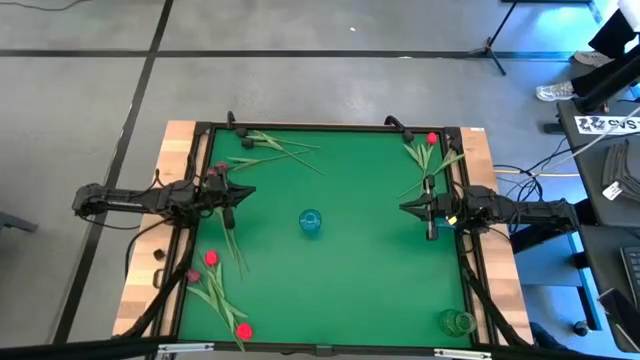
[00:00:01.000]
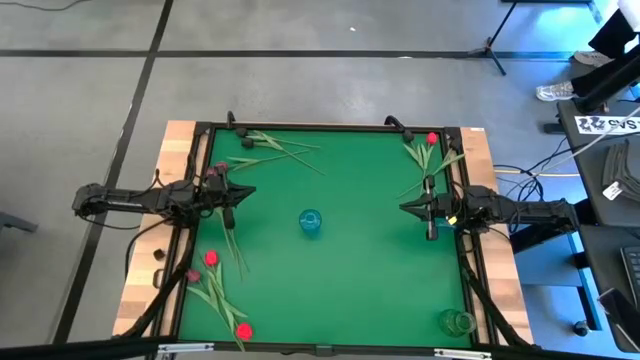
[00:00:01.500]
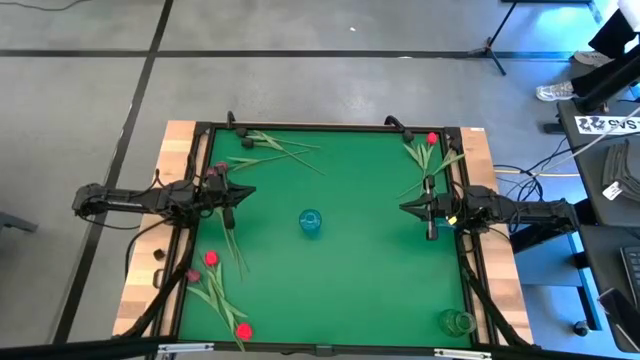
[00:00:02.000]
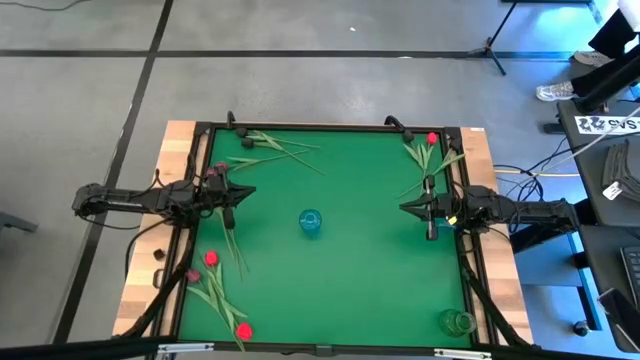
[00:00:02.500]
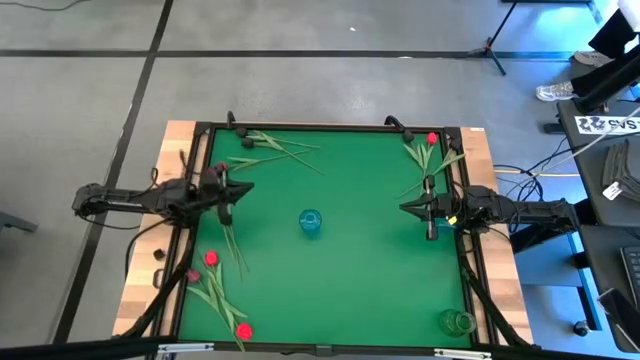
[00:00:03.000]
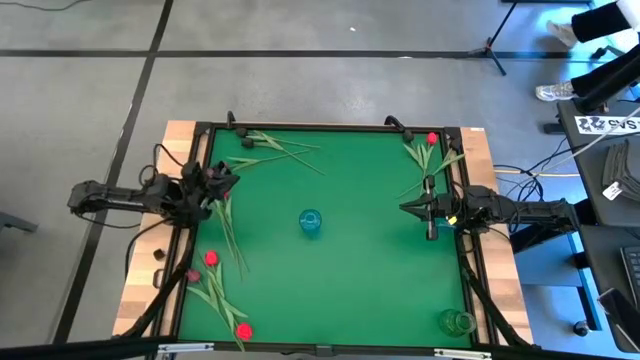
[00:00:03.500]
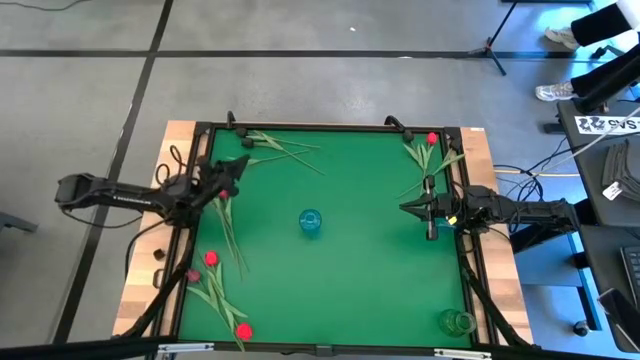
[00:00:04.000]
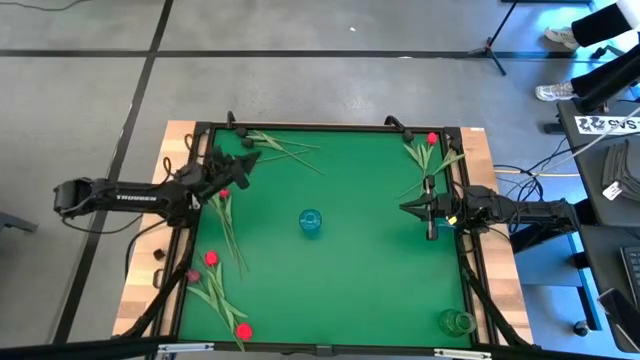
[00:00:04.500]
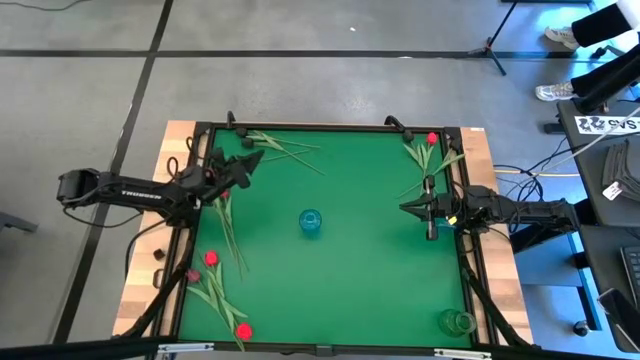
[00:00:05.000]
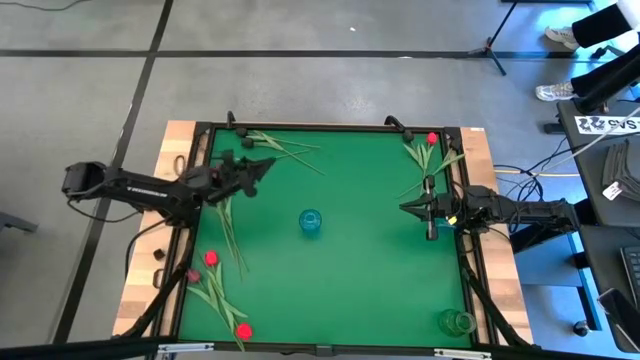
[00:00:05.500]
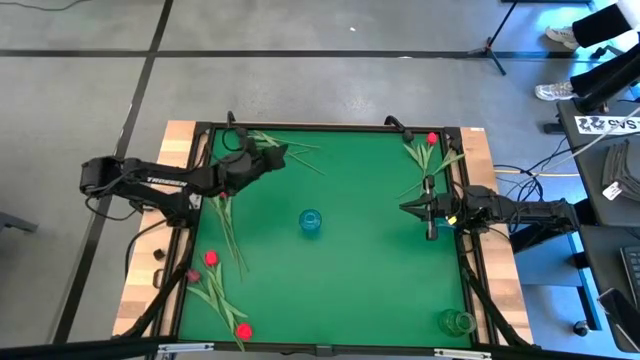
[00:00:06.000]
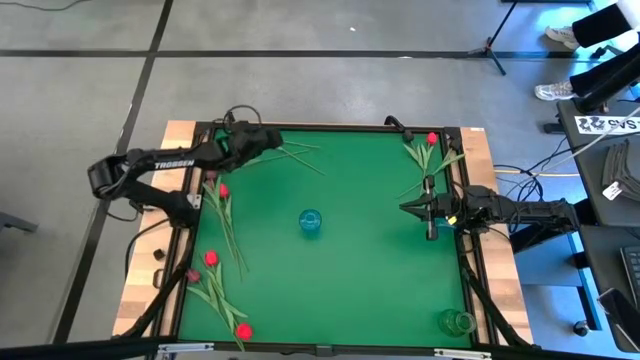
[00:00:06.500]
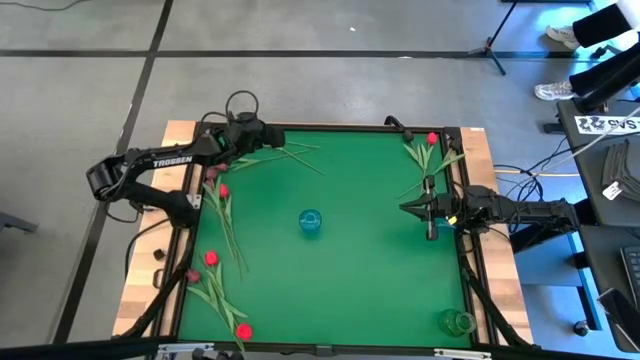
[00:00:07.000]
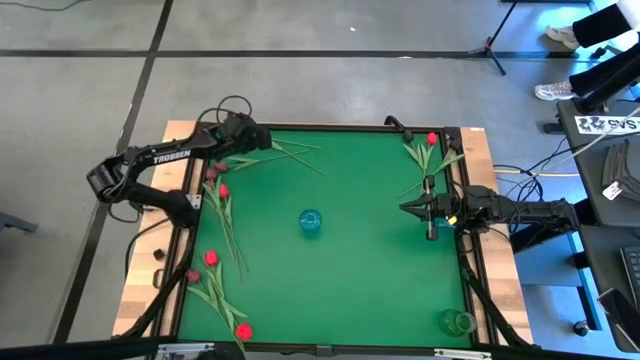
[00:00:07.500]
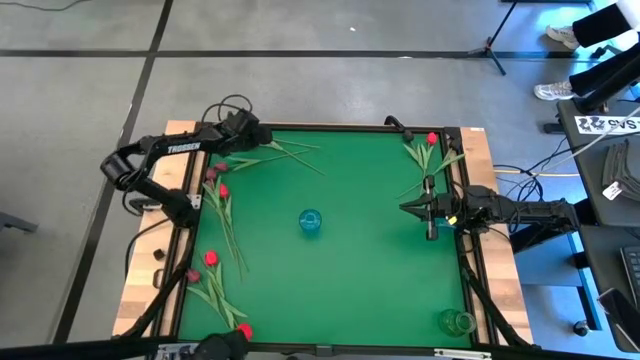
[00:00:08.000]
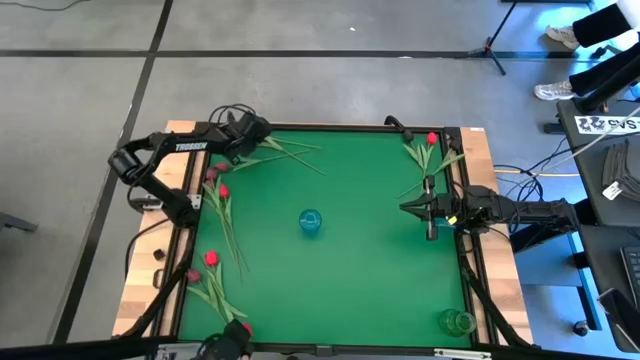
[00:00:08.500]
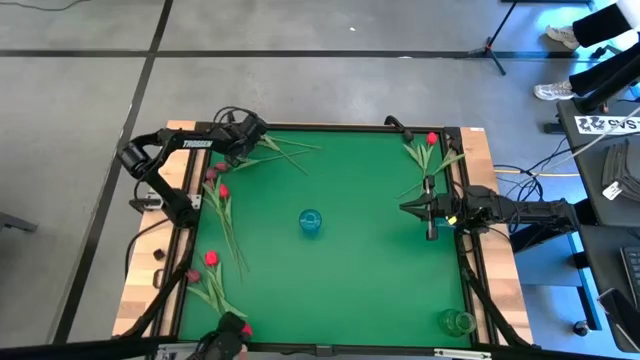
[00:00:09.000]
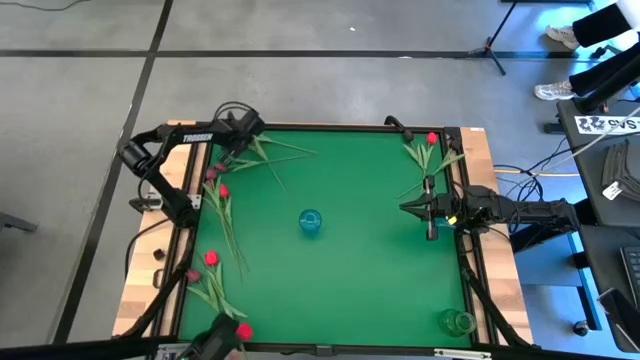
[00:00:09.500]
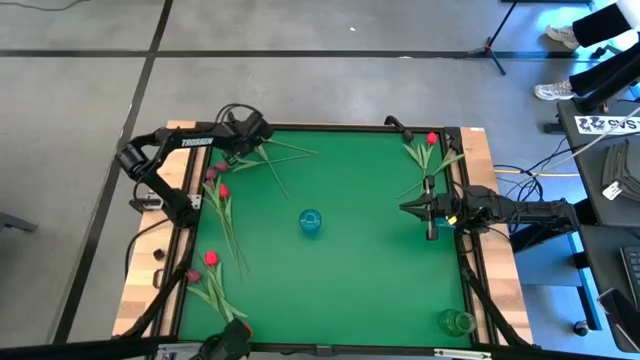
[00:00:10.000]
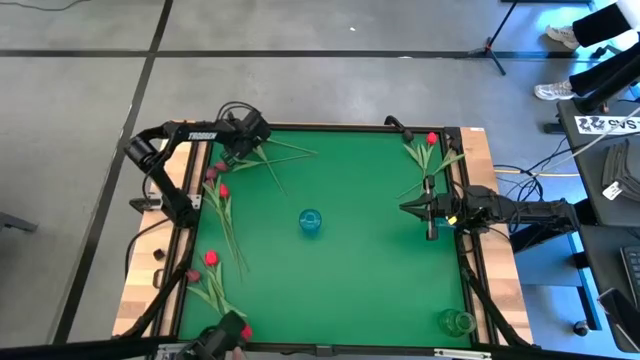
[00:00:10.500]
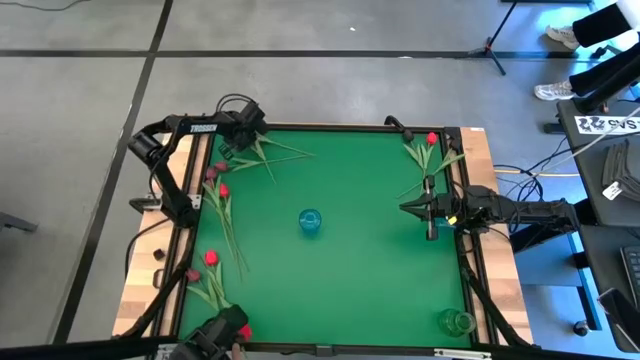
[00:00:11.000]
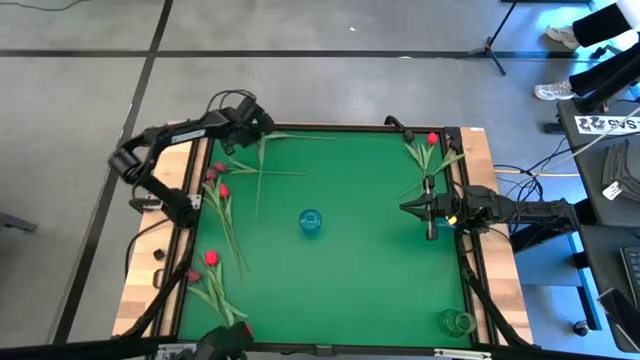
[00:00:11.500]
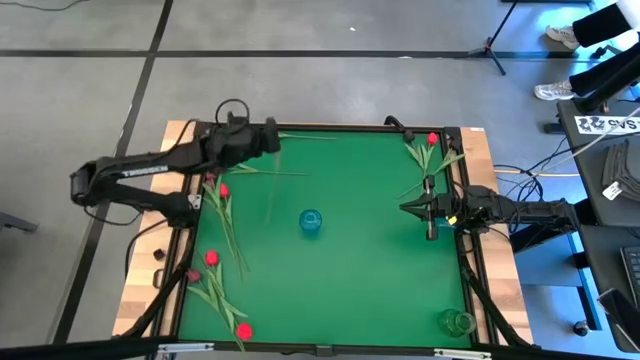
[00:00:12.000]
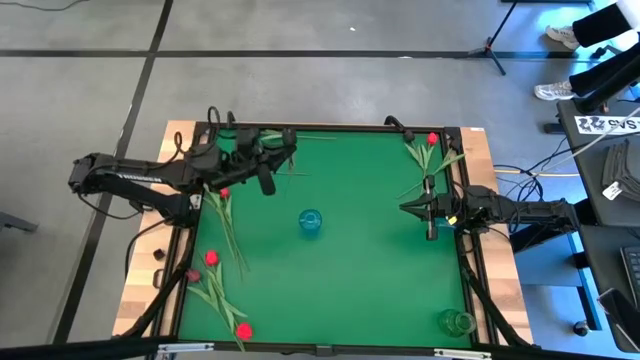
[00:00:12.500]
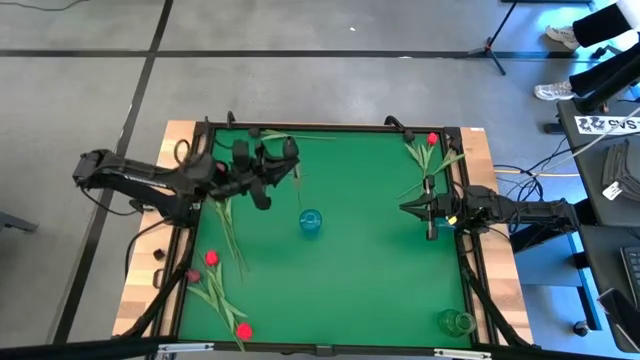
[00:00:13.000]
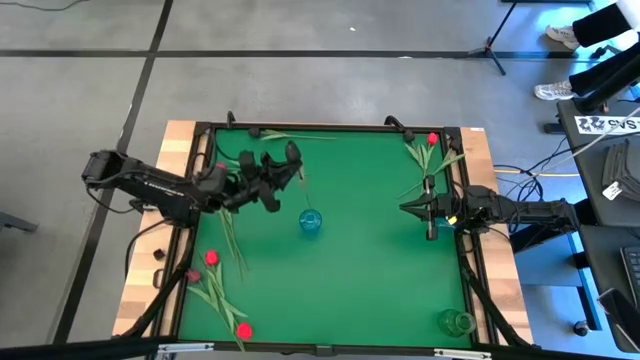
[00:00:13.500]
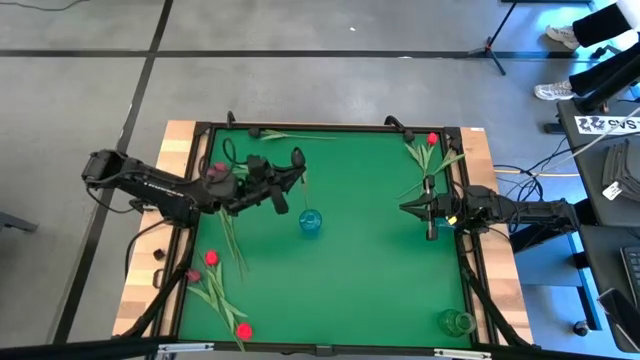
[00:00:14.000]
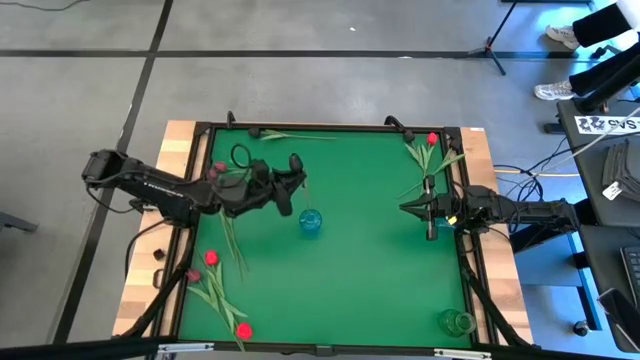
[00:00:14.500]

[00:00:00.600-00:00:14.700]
Task: Sort flowers into vase by color
Put the black flower into the left blue vase

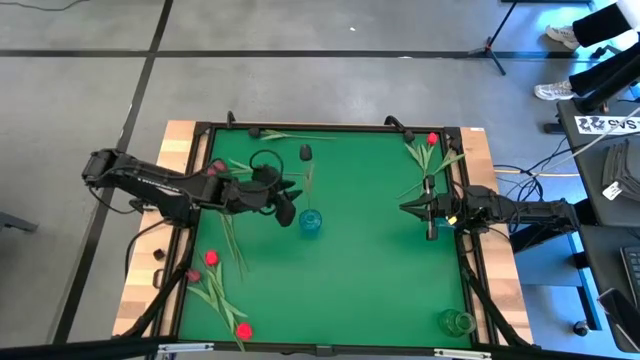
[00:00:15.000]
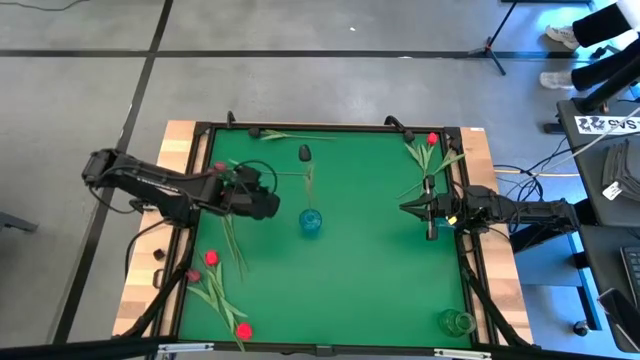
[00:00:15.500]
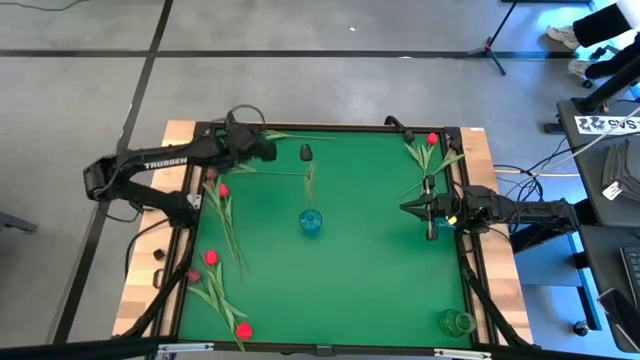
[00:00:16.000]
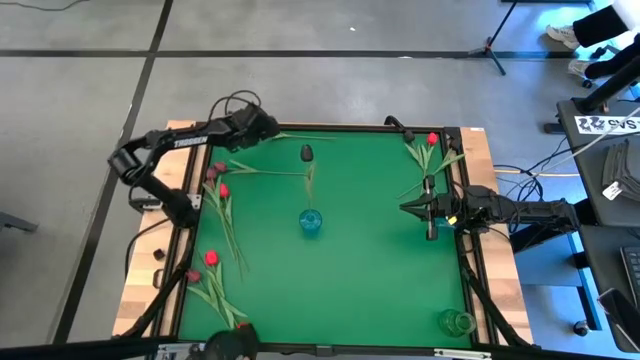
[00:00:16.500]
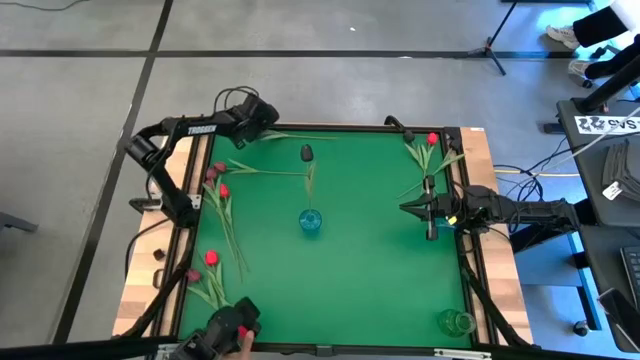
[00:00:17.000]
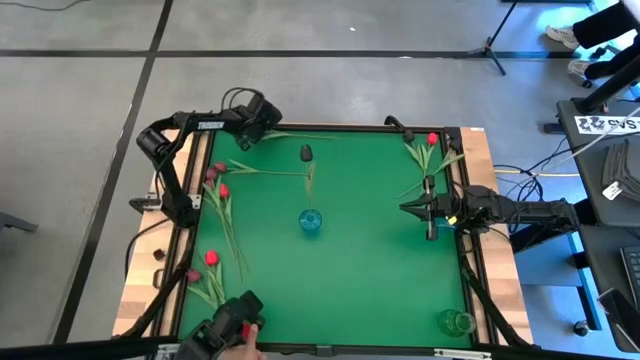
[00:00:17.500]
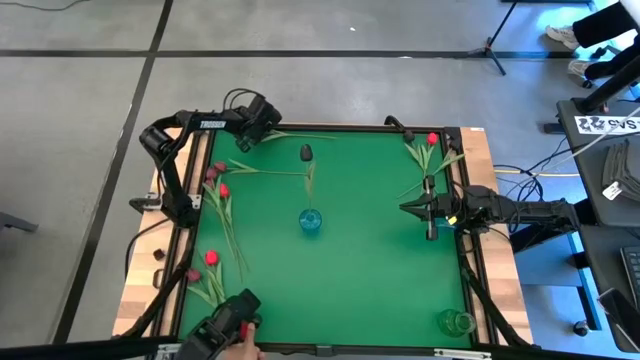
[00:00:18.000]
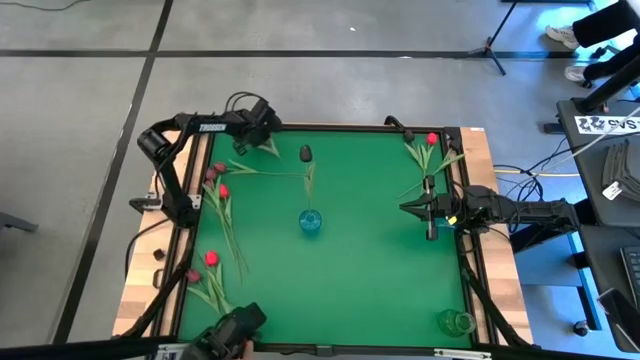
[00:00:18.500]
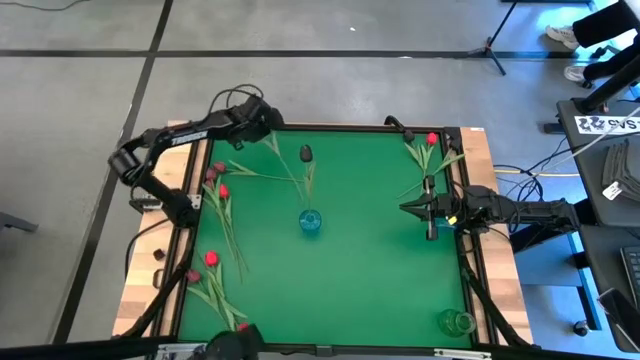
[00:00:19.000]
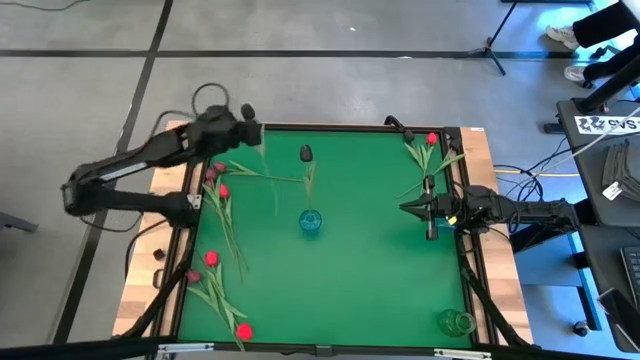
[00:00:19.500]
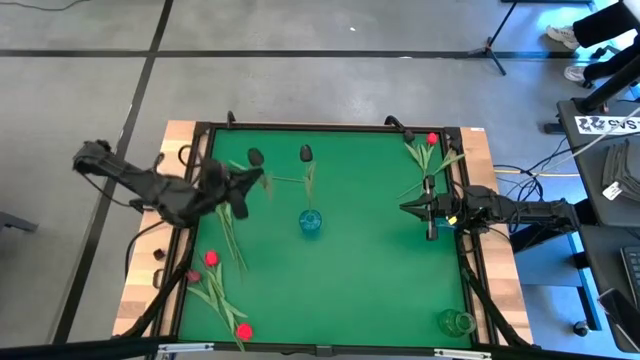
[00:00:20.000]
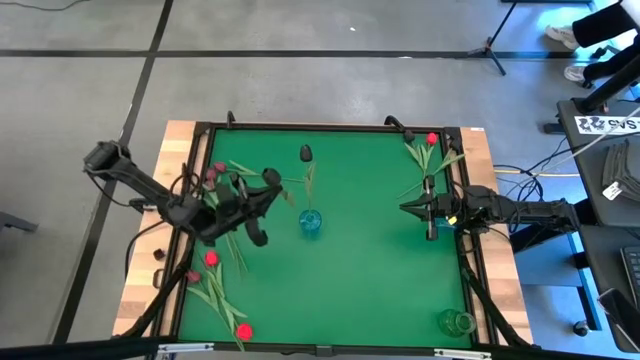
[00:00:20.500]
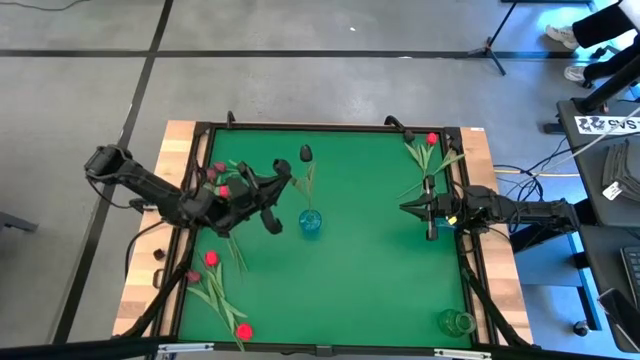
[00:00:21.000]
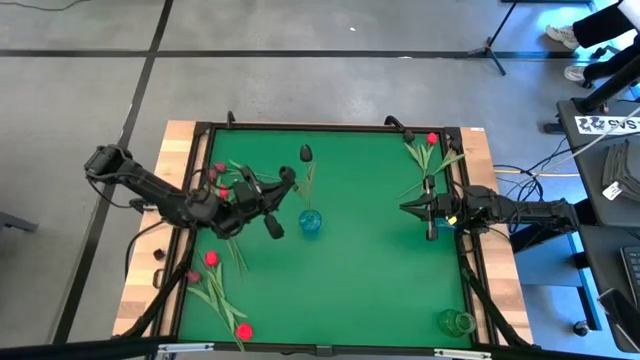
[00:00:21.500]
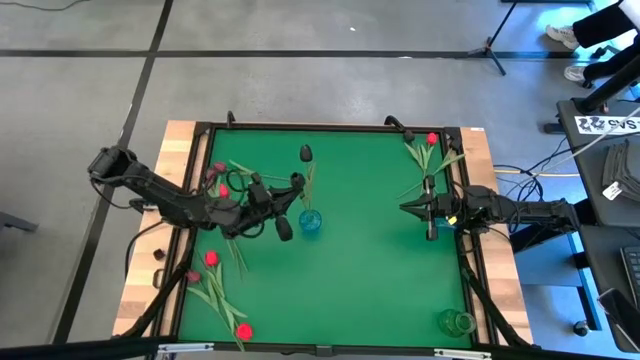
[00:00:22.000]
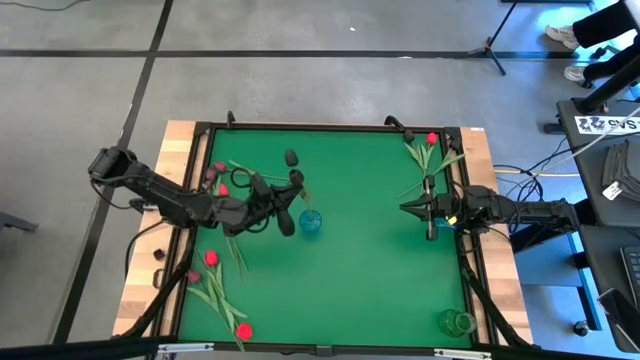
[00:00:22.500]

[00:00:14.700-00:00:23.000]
Put the black flower into the left blue vase
